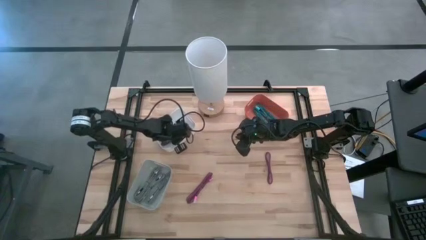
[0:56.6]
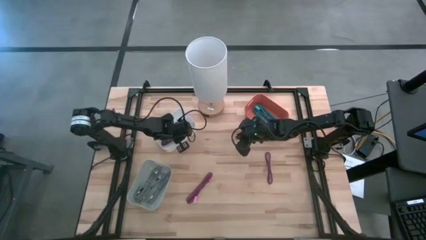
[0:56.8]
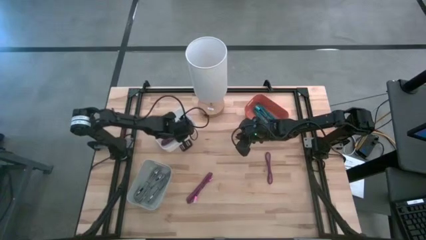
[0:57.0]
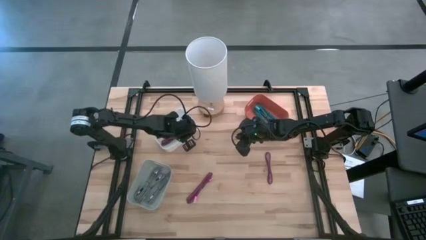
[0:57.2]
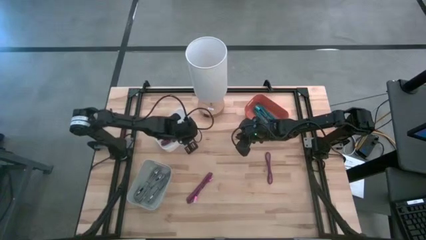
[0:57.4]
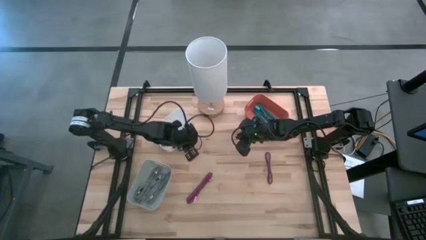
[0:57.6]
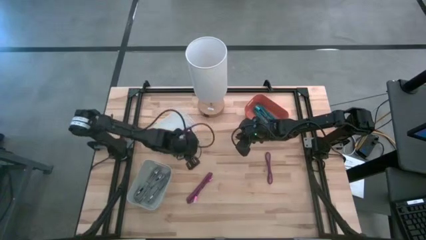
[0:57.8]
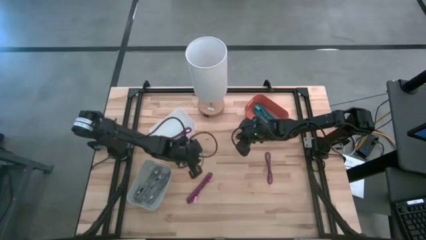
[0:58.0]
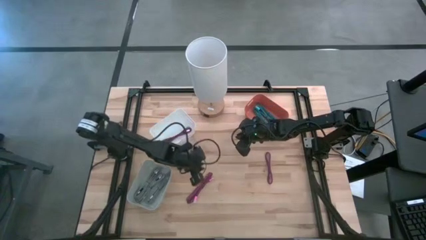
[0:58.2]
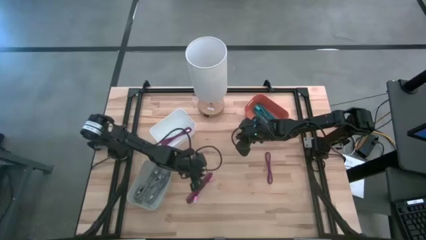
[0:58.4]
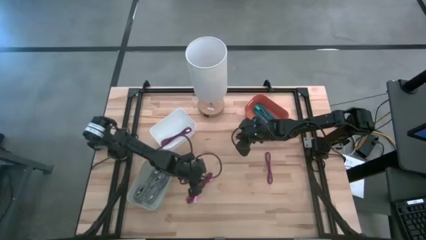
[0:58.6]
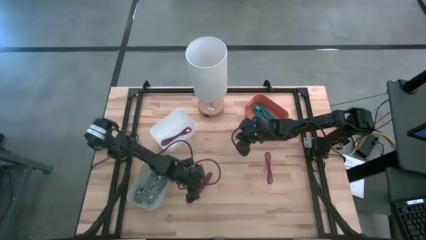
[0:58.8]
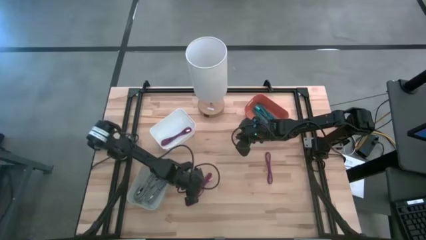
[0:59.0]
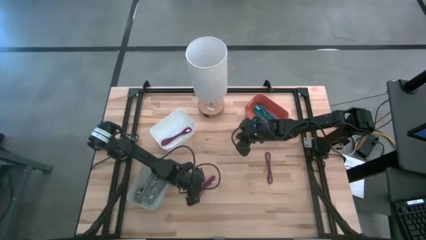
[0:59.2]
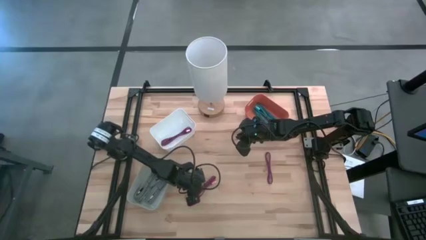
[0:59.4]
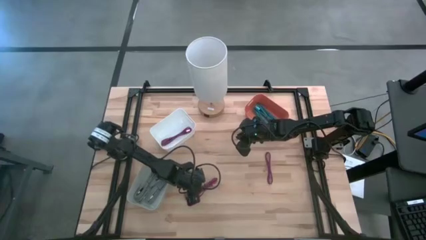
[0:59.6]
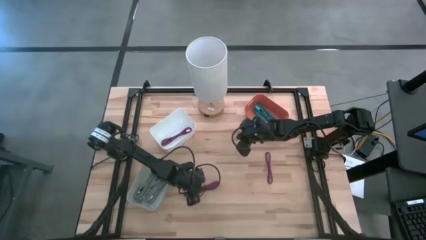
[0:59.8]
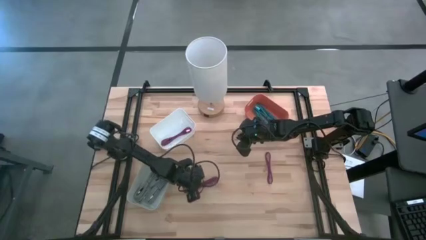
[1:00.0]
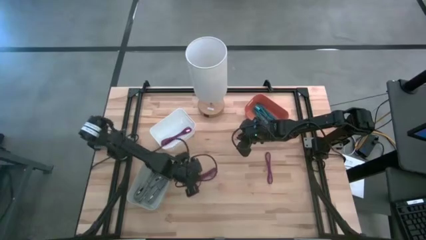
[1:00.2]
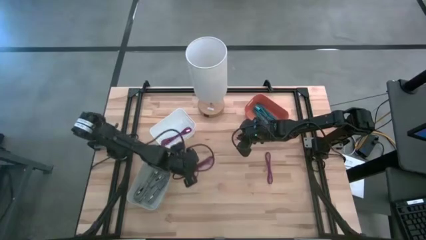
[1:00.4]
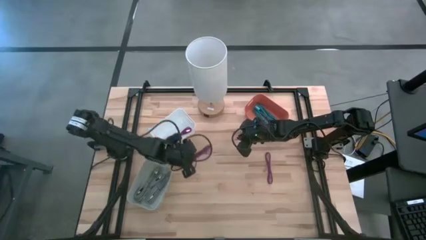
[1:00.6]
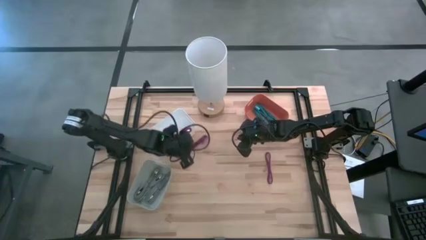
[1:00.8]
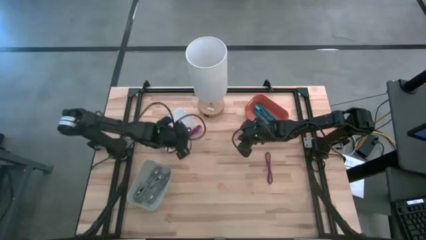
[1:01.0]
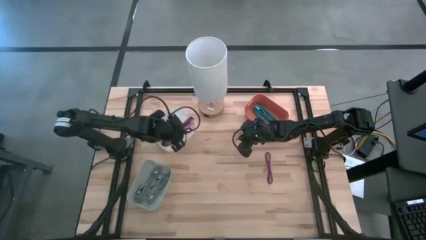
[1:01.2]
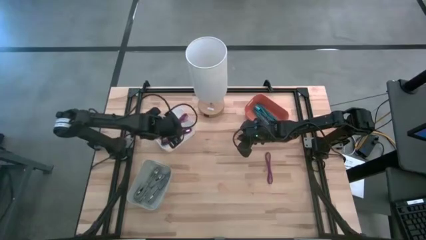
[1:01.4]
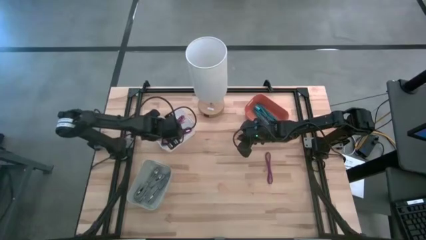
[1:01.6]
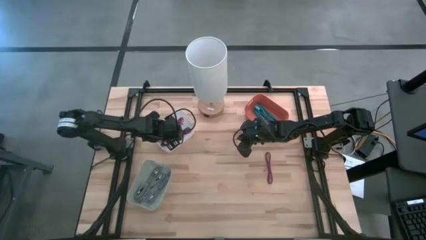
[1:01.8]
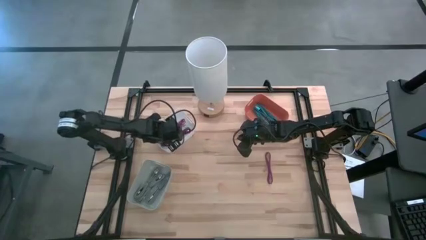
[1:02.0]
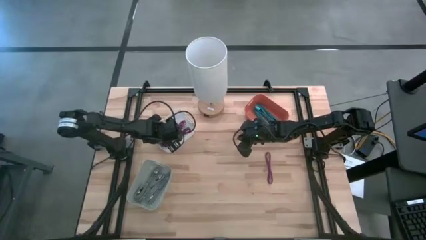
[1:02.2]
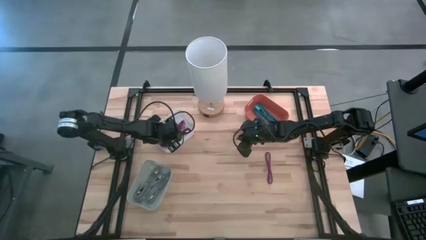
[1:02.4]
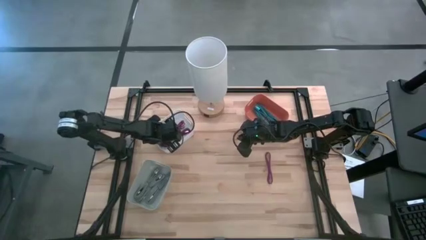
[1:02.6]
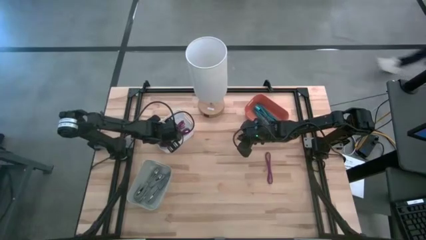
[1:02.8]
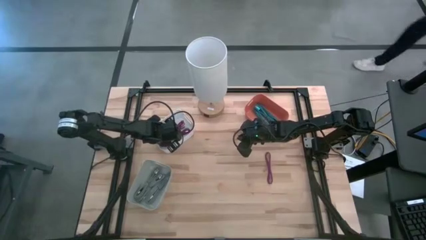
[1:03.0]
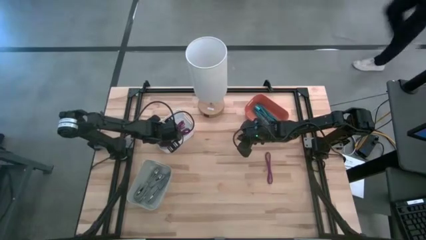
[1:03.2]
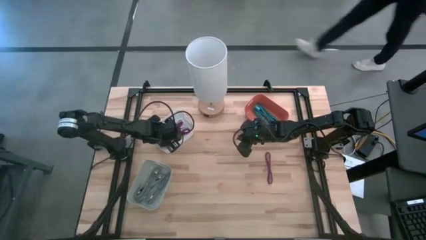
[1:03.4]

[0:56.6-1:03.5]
Task: Pick & Place USB Port
Put the left red and black charger cable into the white bin

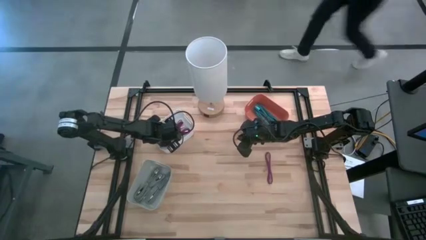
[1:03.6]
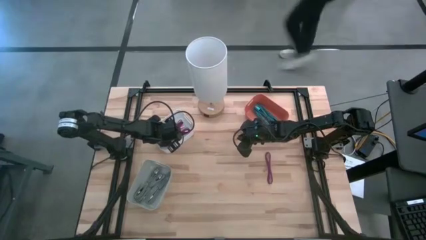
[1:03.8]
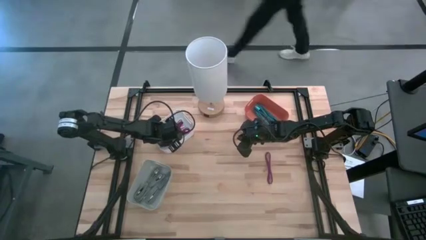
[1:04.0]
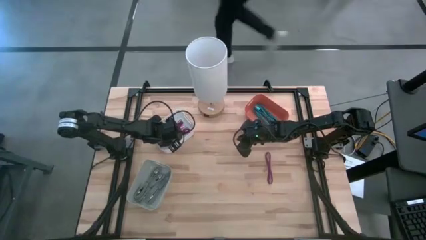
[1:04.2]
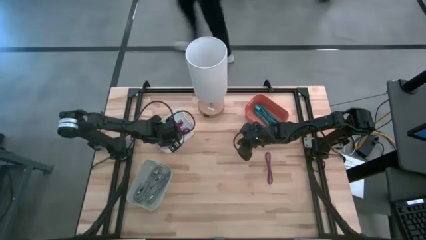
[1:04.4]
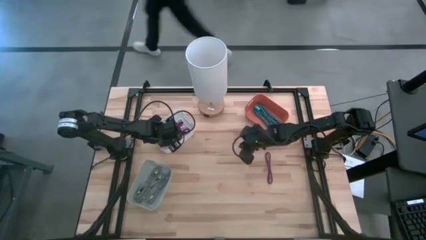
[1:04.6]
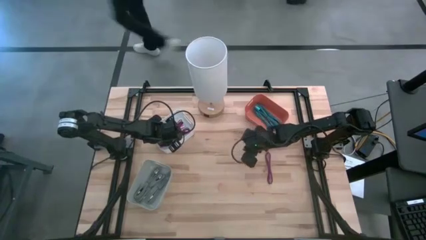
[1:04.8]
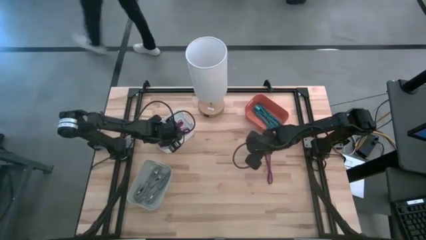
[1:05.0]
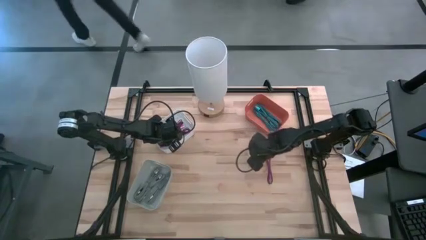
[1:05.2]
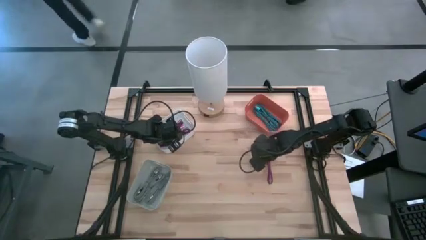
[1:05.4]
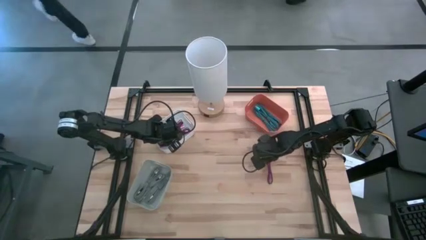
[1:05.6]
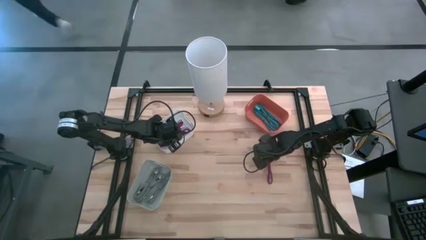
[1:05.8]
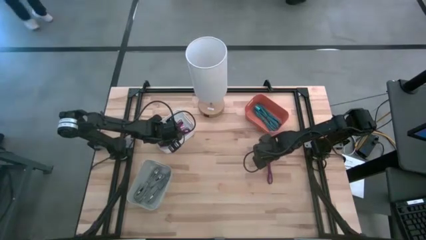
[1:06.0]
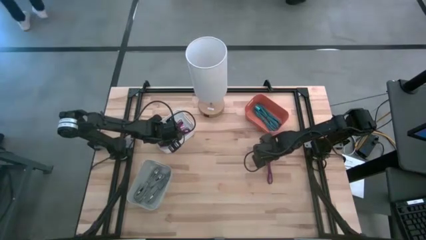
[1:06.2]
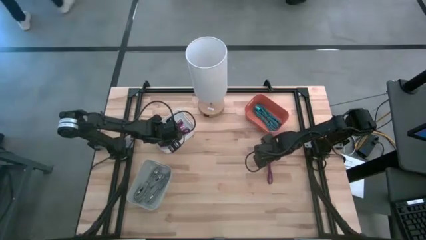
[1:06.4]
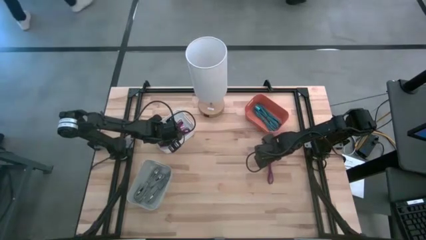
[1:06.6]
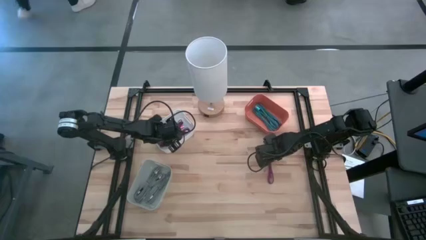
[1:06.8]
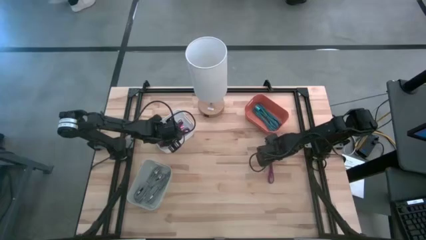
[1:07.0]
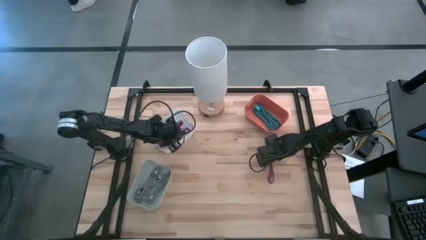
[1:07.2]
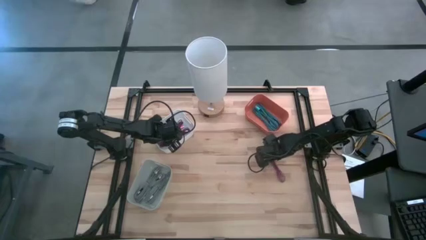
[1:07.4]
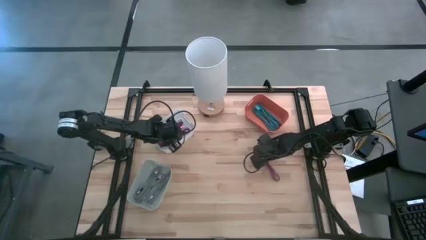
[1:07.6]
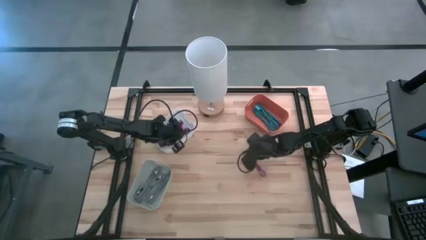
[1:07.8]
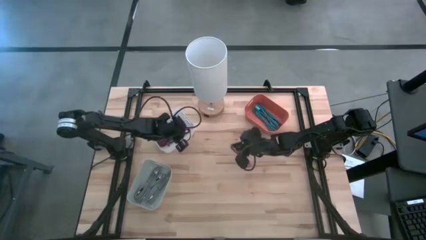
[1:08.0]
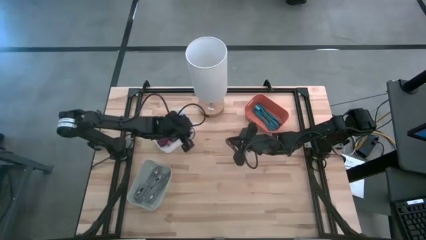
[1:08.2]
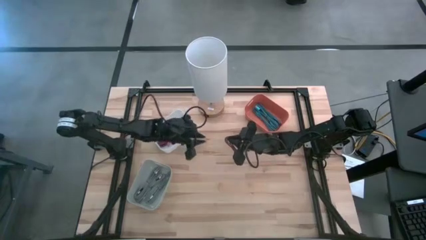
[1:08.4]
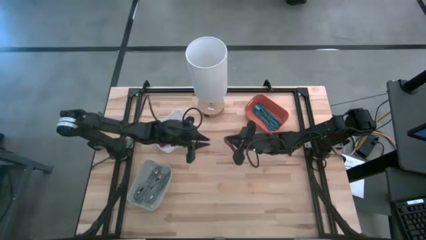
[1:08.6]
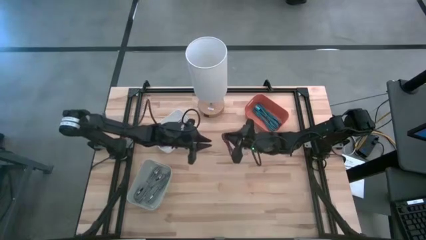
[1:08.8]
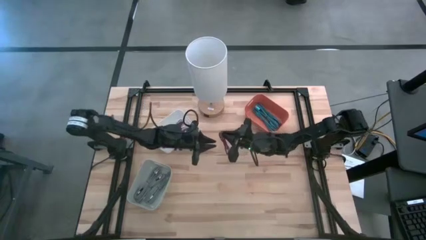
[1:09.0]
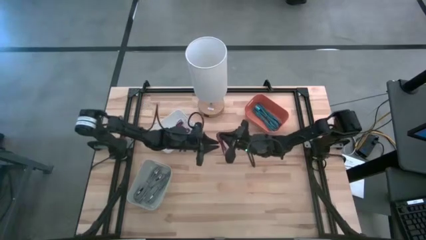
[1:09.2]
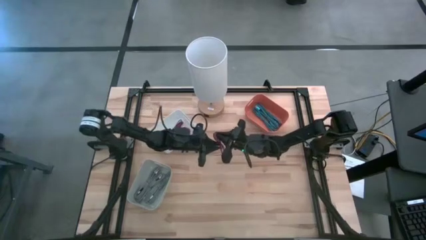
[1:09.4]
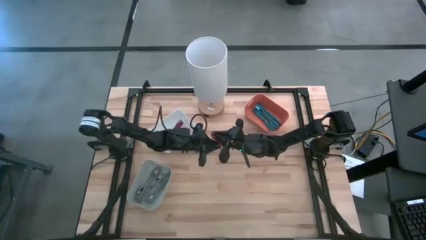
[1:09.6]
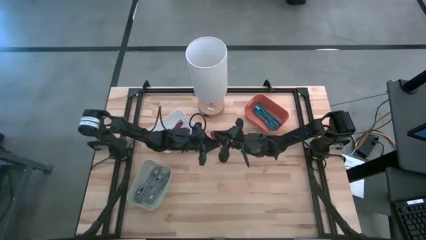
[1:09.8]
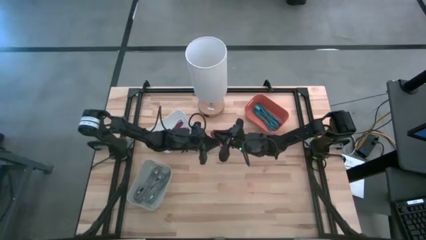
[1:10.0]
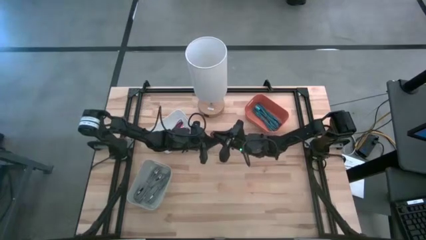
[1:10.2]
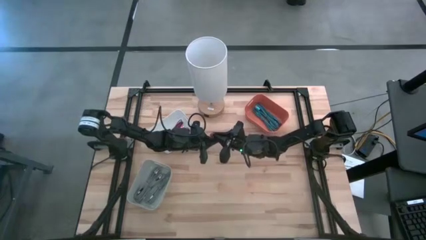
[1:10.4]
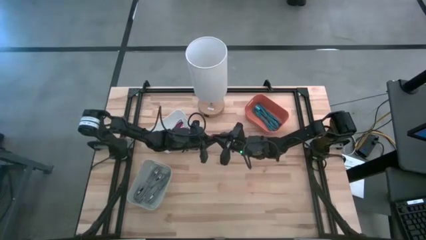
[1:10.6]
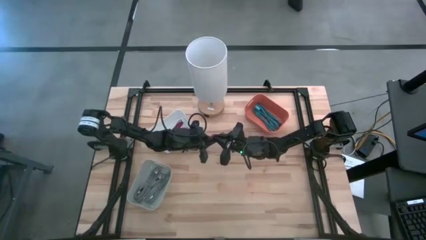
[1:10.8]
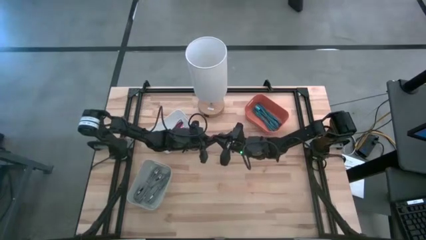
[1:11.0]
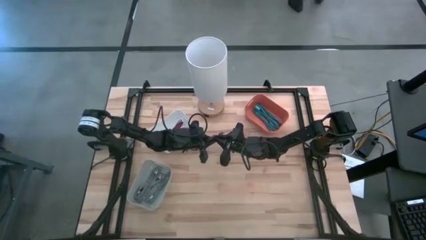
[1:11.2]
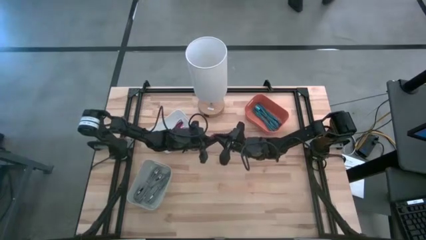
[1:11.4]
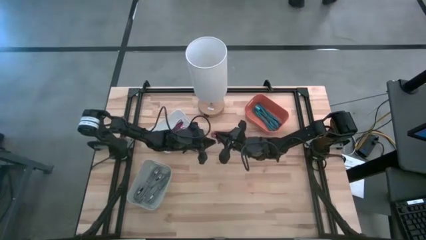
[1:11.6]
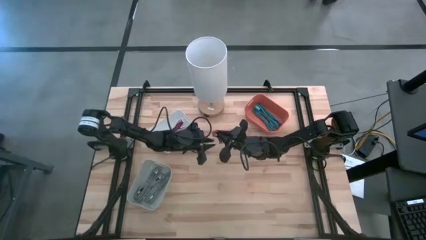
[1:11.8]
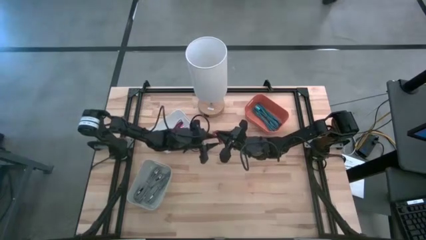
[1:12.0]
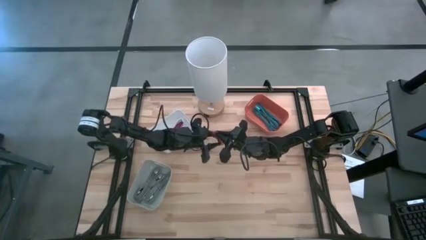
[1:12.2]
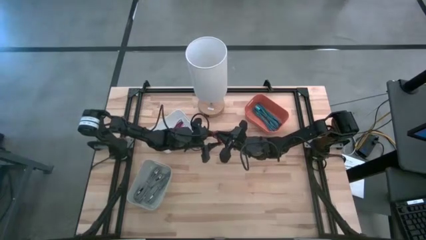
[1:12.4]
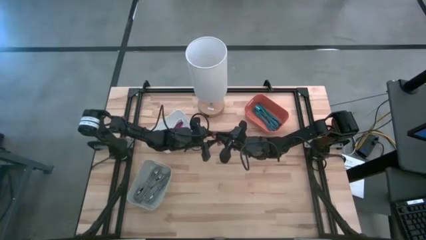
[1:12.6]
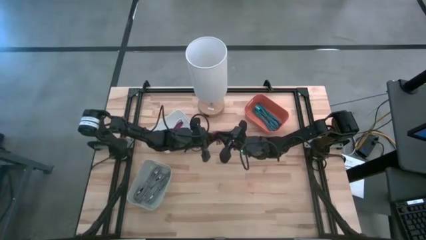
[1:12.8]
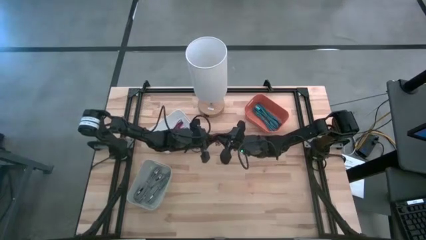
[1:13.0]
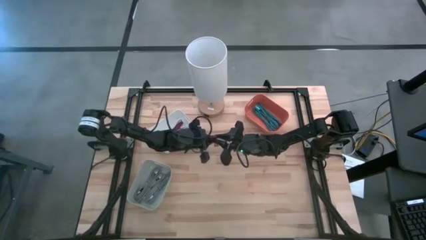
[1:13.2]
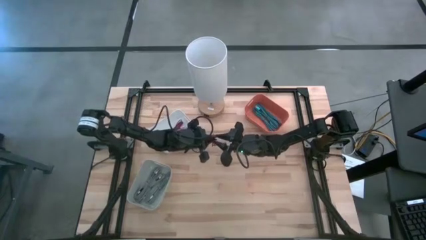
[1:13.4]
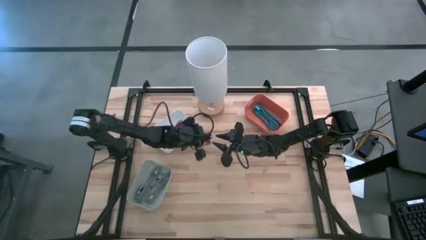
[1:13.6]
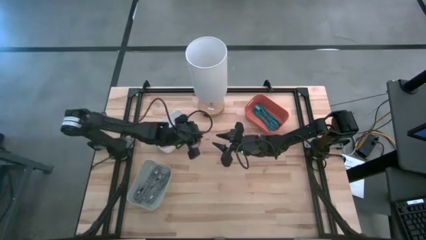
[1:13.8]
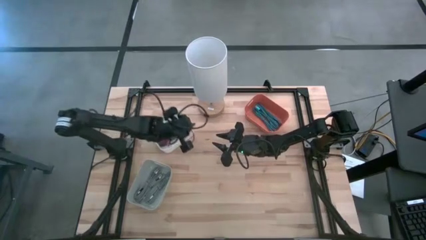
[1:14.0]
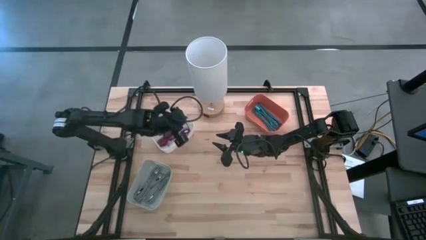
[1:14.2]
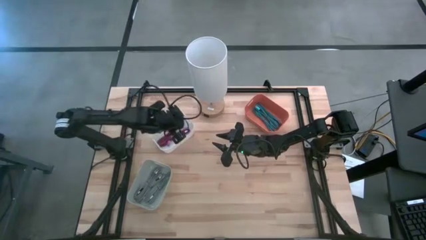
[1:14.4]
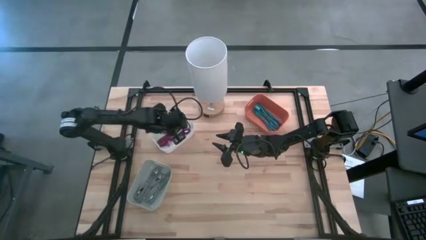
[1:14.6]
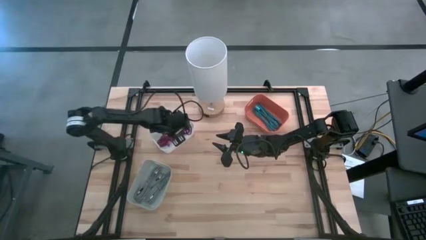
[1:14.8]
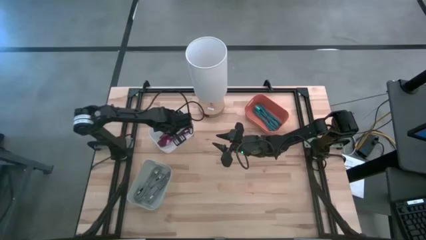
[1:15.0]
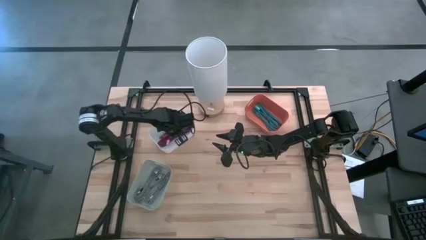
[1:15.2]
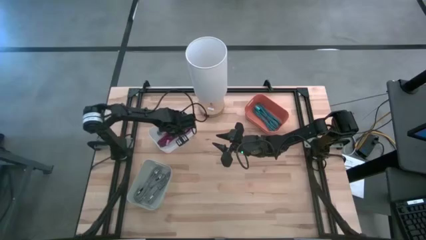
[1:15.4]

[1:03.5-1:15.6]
Put the red and black charger cable into the white bin
